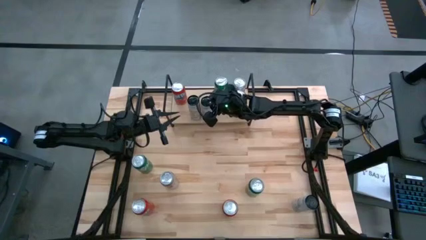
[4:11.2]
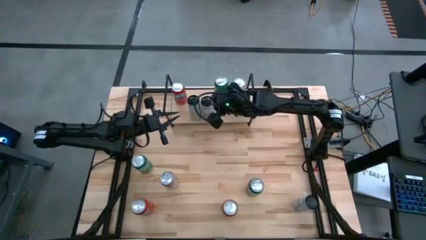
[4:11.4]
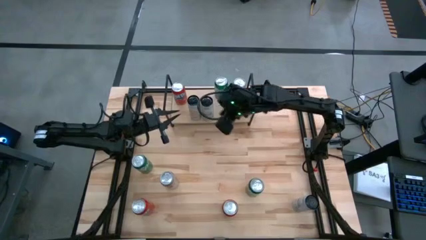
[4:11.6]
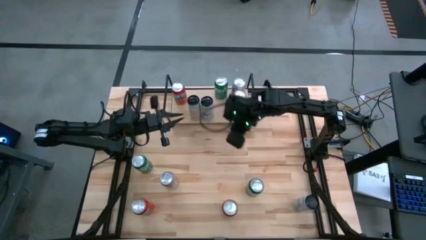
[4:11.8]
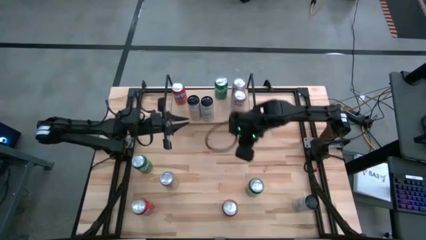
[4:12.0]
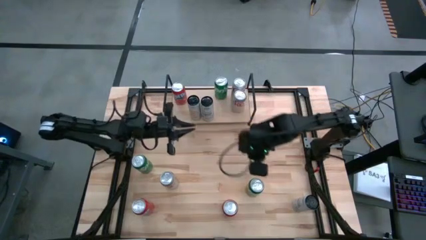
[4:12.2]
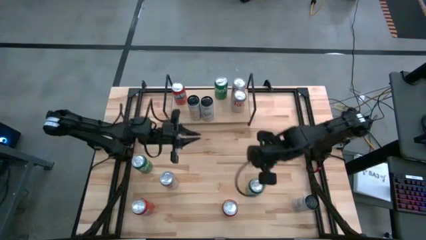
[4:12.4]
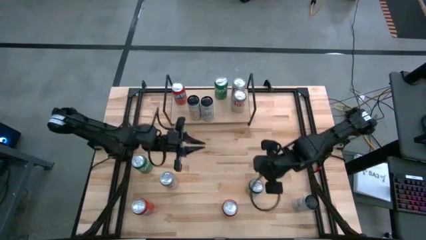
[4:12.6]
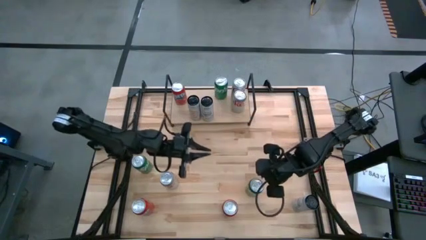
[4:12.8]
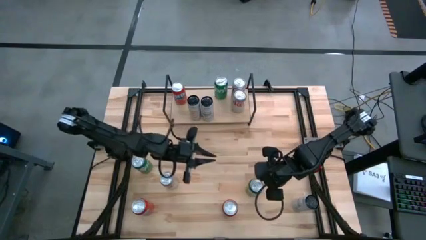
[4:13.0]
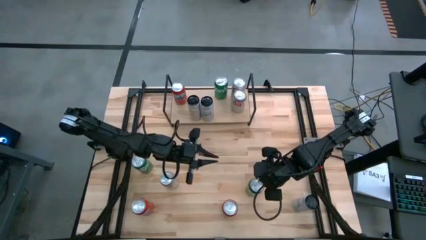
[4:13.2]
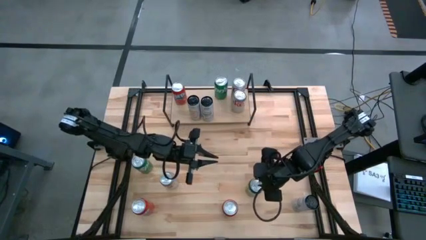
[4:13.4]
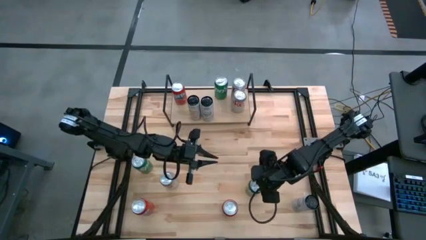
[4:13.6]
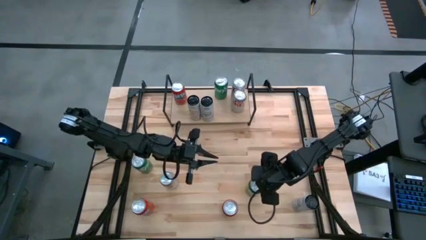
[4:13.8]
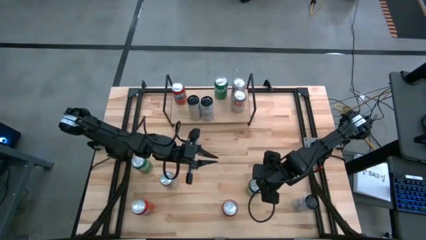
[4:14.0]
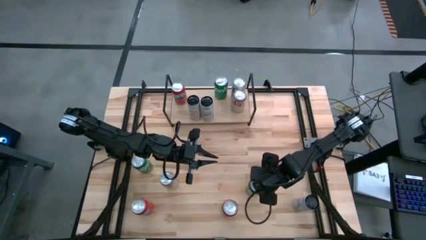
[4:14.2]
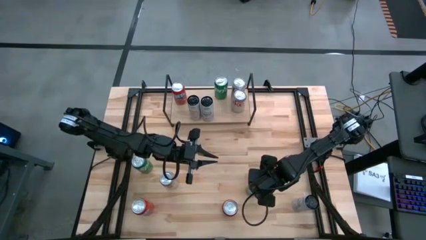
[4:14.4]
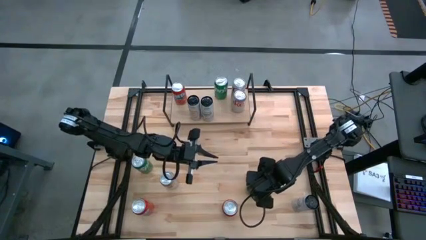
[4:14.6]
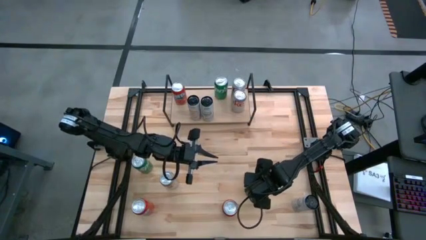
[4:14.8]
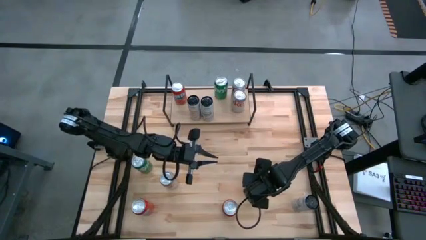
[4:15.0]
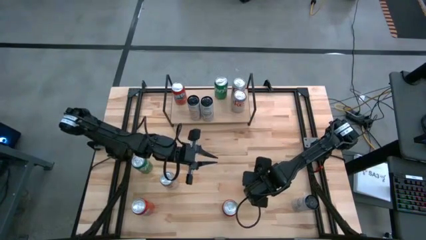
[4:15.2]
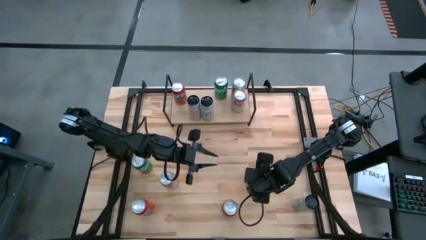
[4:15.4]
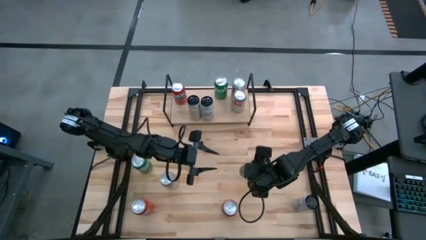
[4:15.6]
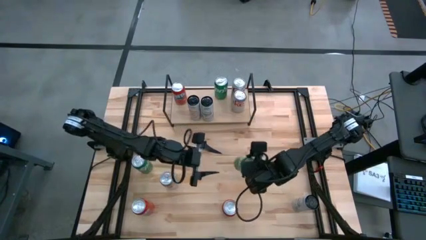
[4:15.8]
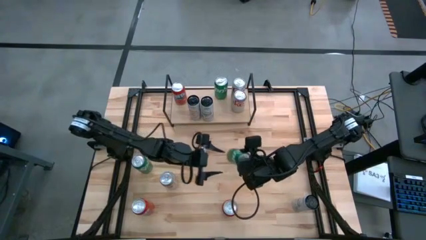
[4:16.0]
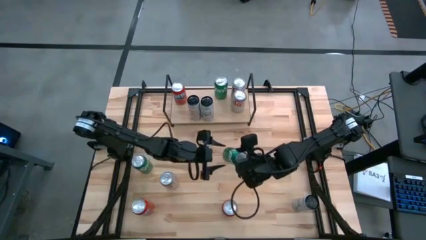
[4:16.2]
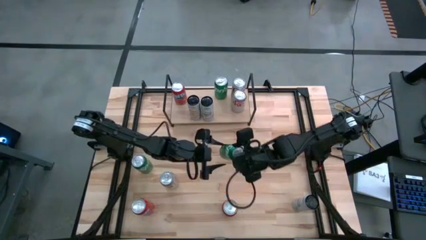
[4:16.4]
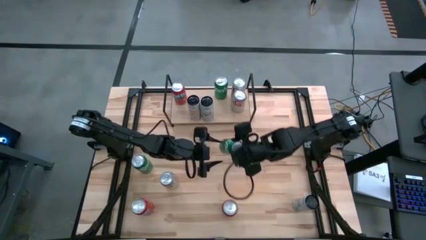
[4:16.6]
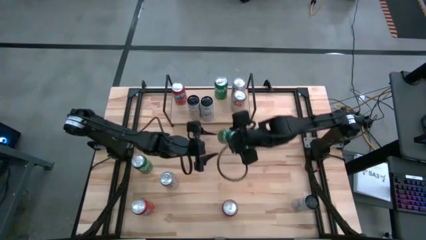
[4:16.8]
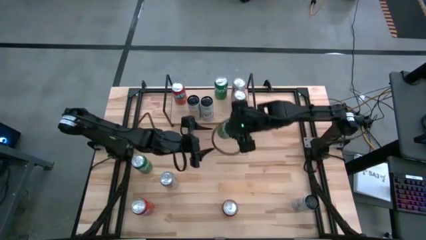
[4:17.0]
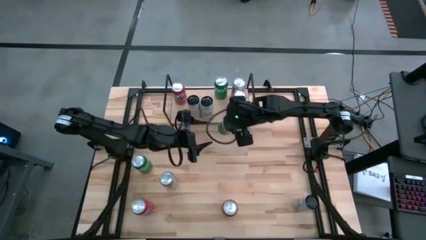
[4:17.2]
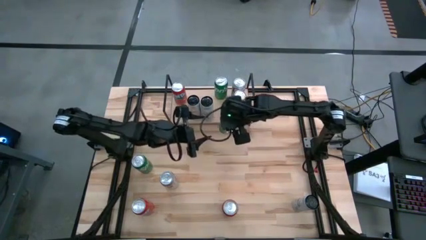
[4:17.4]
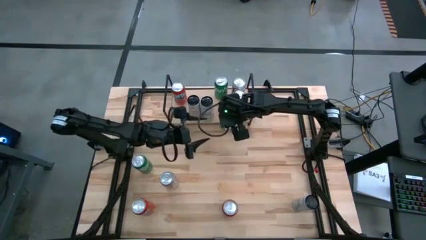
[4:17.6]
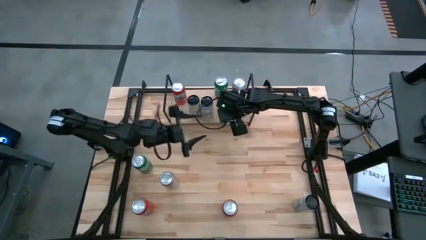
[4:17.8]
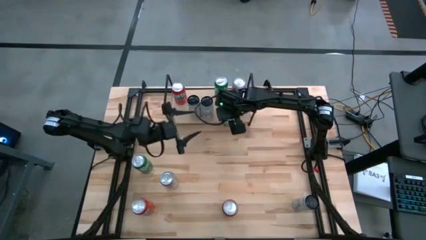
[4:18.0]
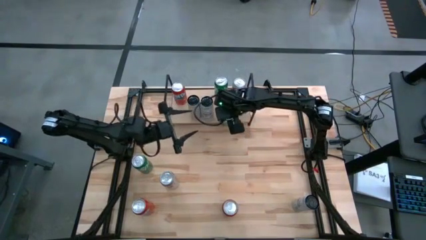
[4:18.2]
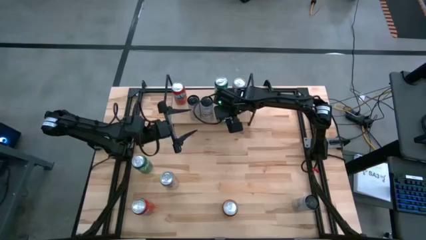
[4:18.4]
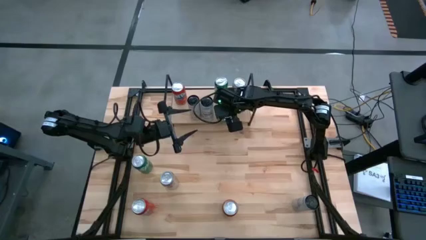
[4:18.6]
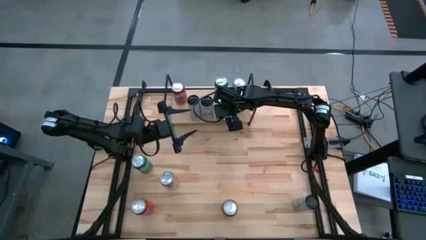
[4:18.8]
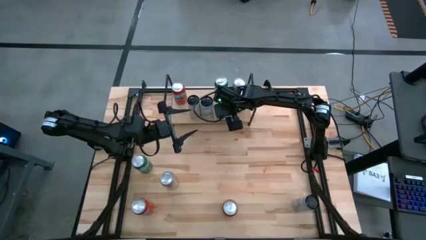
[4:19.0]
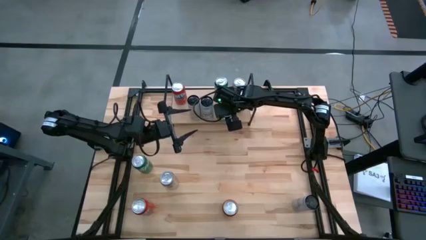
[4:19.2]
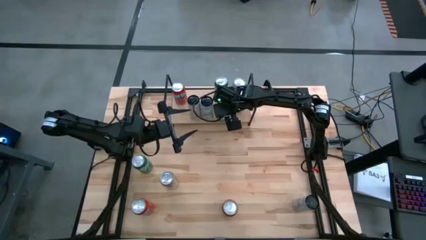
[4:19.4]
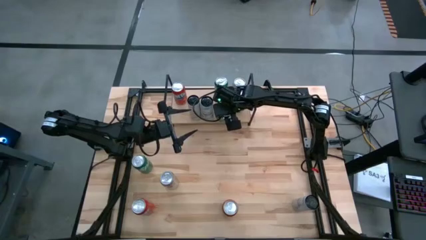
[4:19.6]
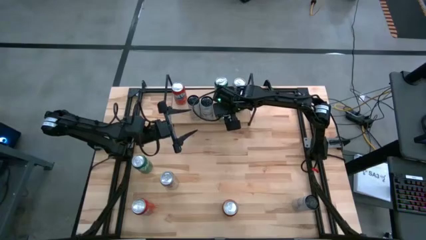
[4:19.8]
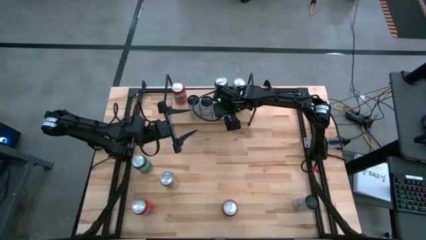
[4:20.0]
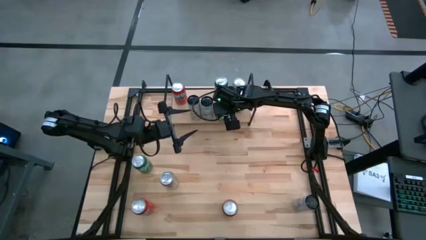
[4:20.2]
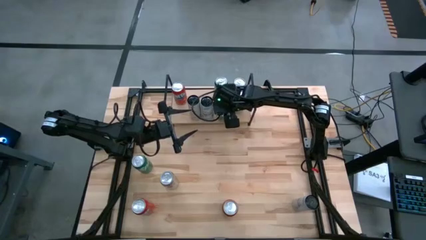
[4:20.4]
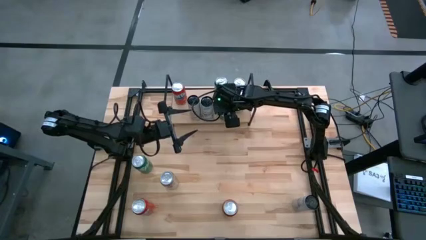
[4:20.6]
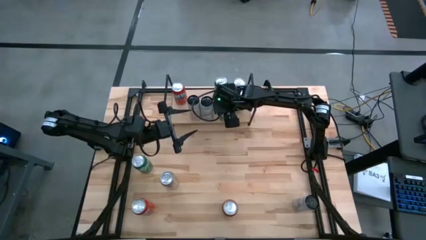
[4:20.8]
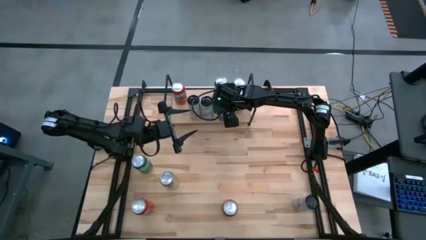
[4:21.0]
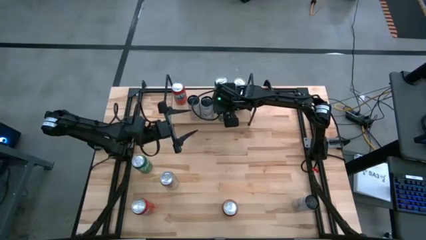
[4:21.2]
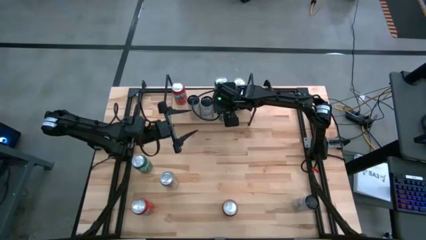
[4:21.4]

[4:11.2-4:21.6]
Task: Sort soda cans
Put the right green soda can on the shelf and align it with the other green soda can

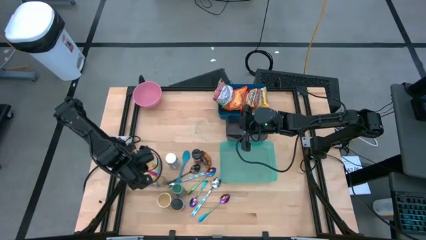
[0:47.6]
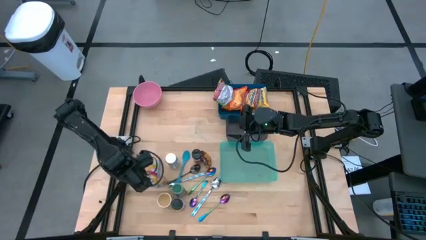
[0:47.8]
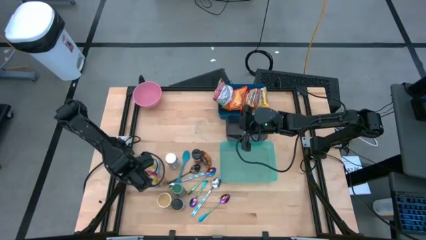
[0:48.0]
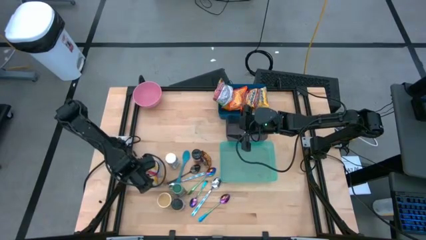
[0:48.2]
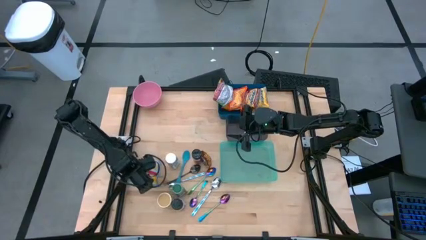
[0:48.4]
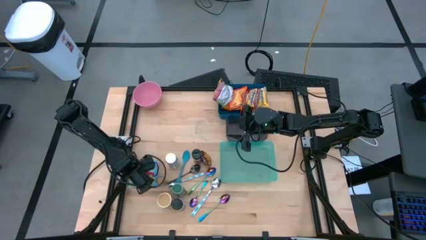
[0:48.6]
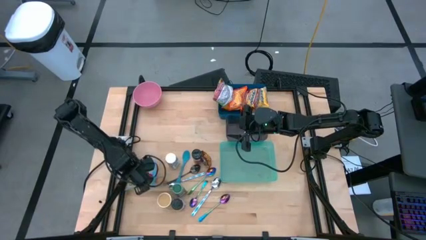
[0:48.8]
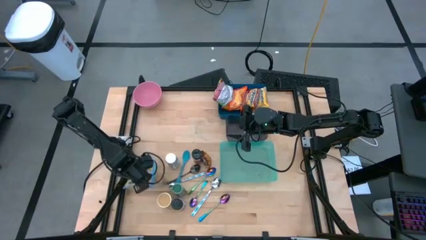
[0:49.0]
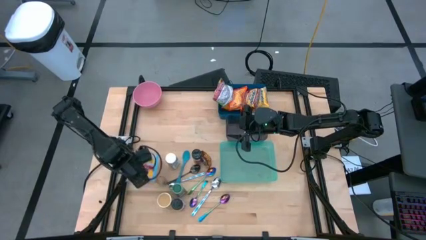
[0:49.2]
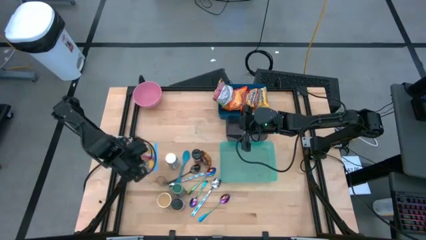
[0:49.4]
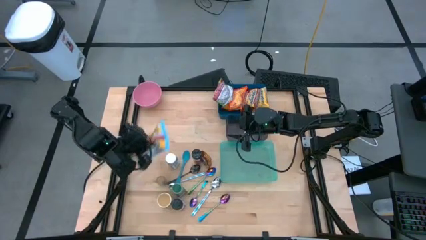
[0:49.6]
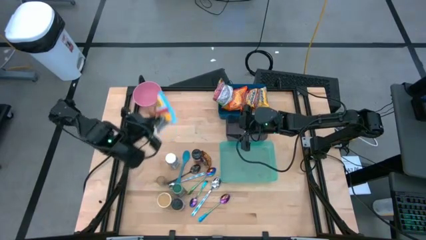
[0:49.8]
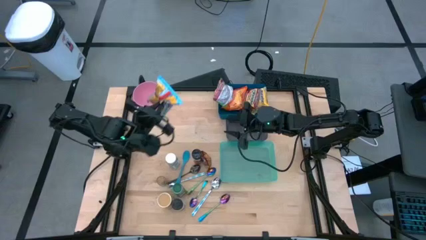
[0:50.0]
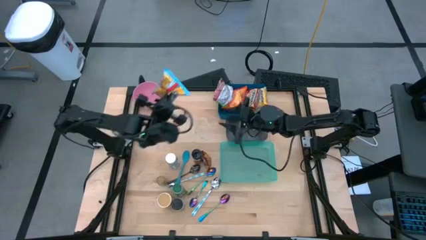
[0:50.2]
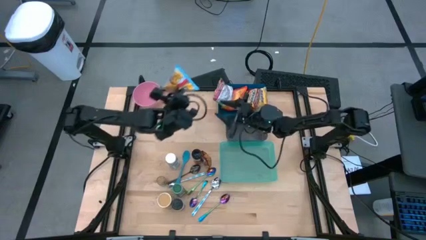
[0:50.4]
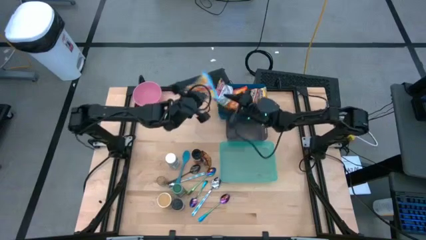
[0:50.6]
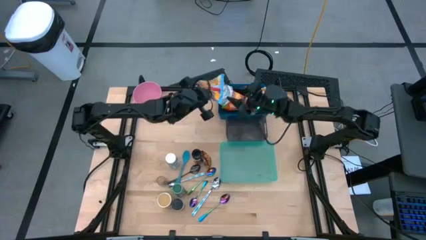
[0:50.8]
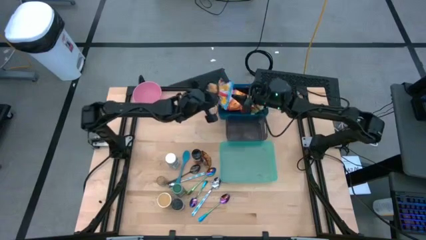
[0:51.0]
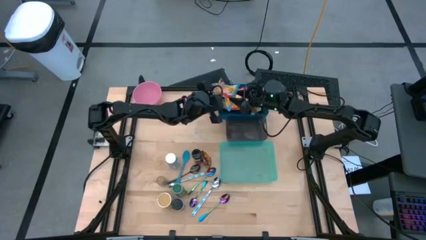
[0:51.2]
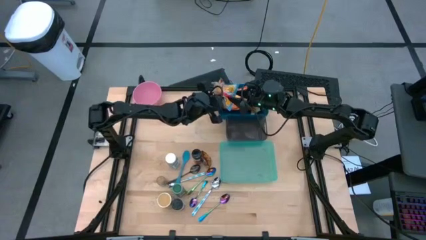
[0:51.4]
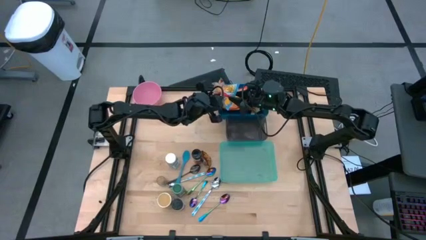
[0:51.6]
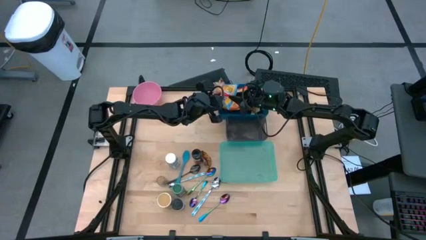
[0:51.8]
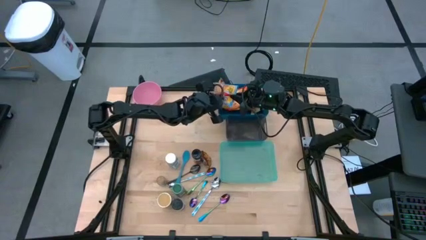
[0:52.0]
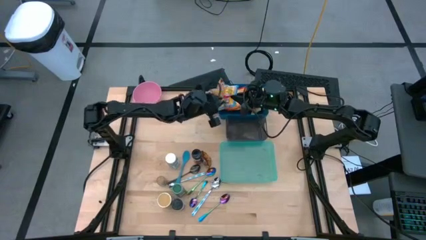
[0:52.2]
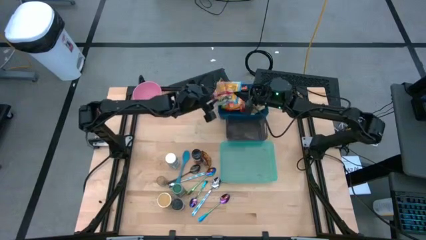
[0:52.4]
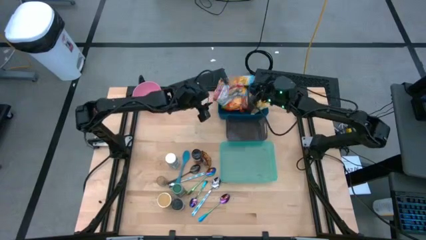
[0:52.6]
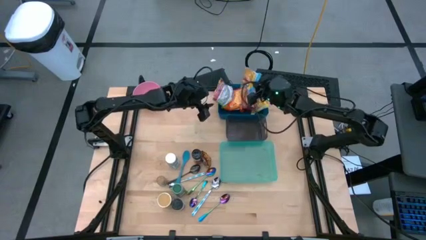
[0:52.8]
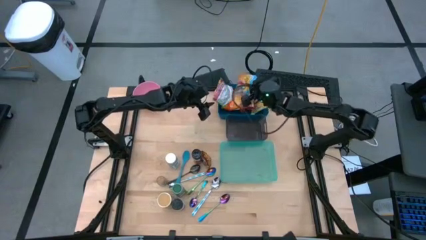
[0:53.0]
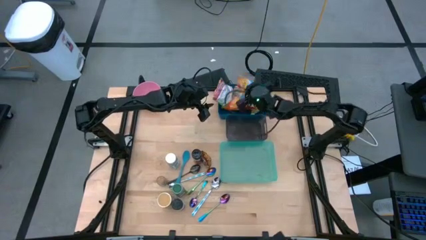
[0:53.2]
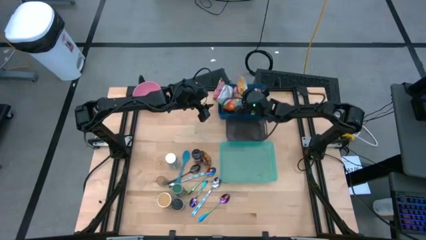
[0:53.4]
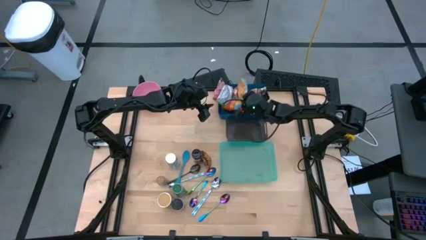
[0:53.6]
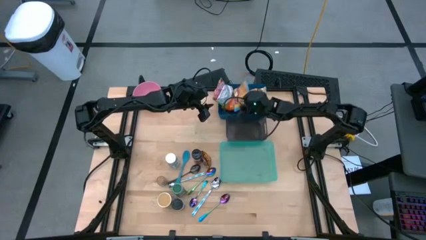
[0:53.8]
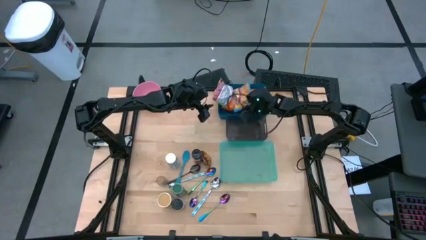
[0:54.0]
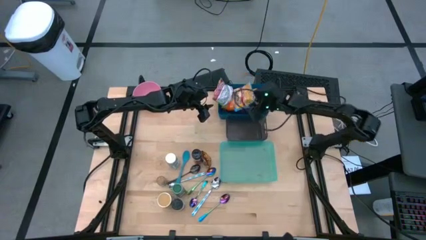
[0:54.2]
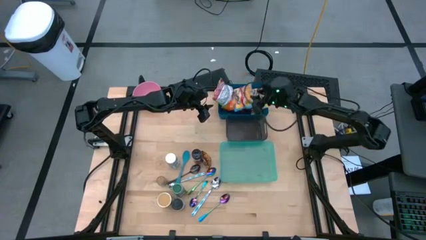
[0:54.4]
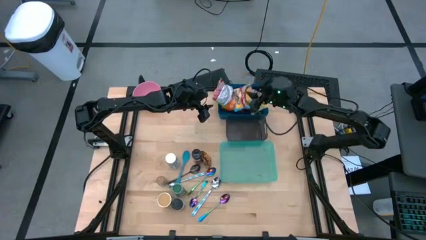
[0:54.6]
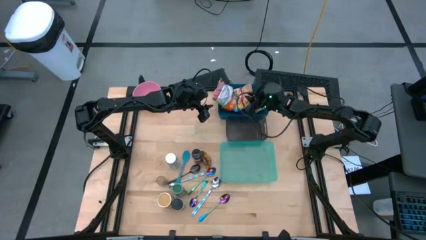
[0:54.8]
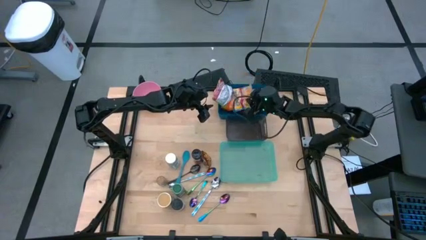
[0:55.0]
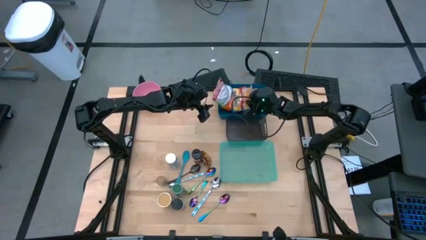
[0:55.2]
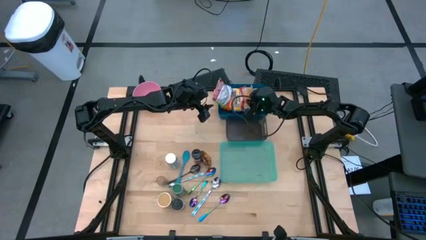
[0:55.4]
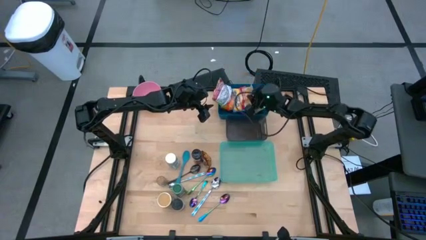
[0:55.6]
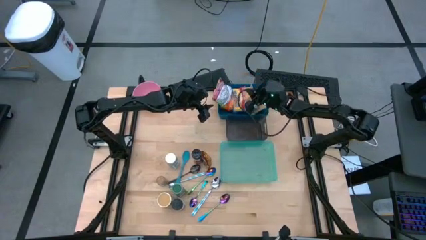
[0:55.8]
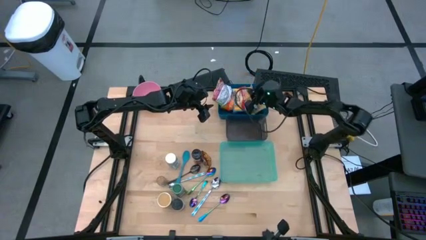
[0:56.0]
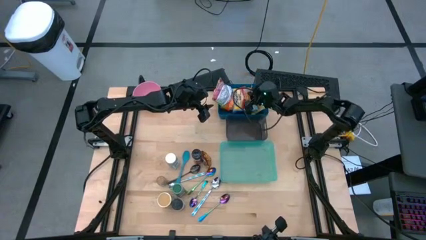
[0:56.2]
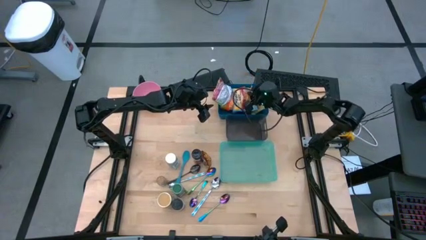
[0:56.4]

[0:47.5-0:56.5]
Task: Pick & Place Food Item
Put the blue noodle pack into the blue bin
